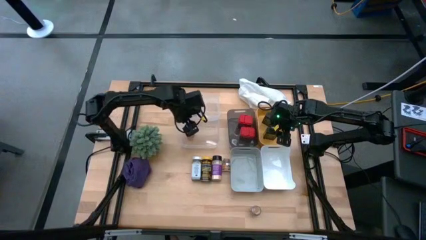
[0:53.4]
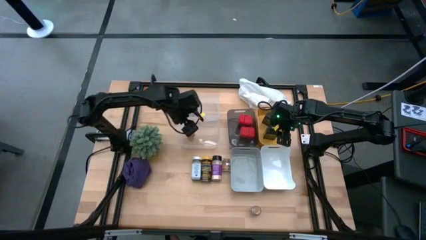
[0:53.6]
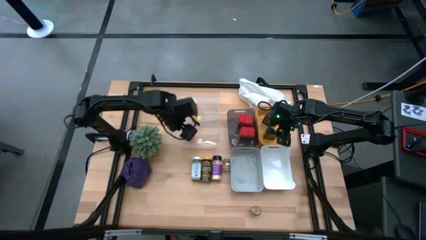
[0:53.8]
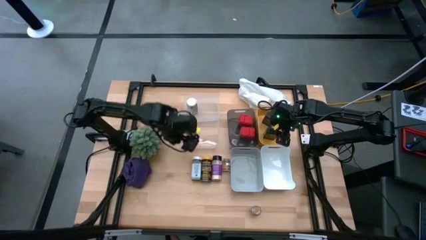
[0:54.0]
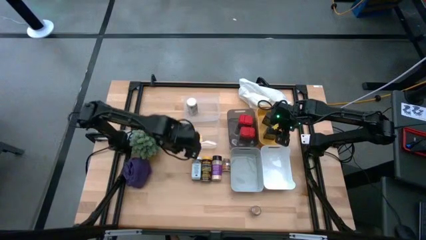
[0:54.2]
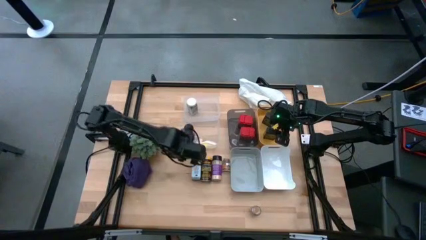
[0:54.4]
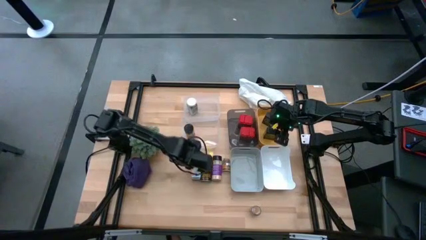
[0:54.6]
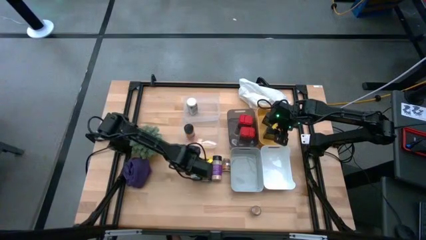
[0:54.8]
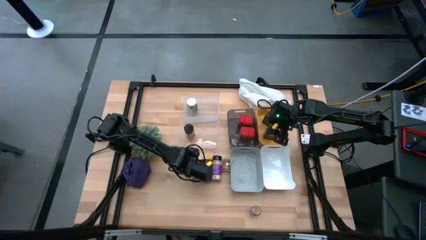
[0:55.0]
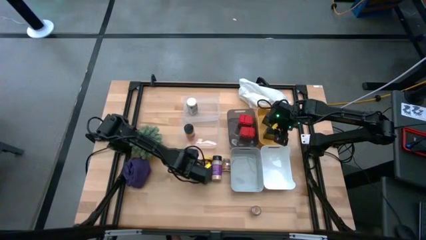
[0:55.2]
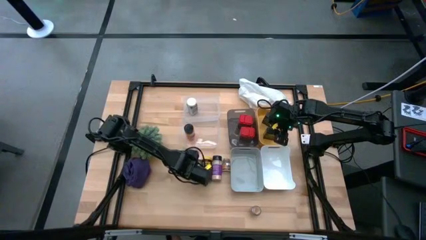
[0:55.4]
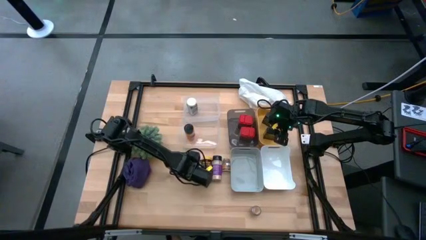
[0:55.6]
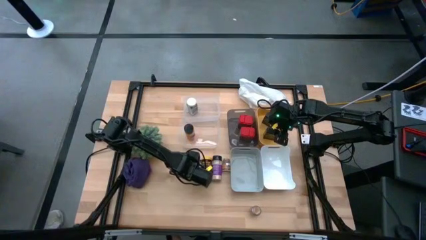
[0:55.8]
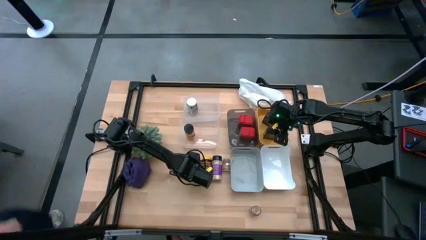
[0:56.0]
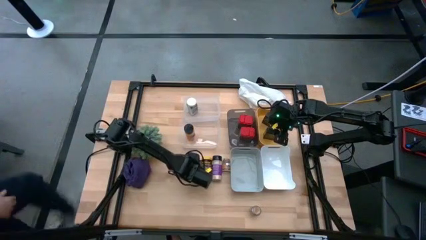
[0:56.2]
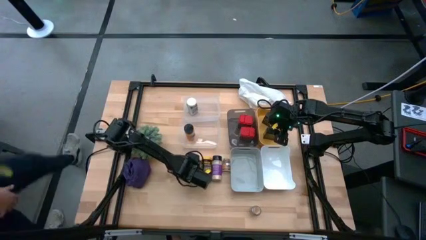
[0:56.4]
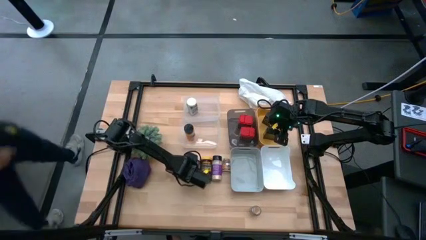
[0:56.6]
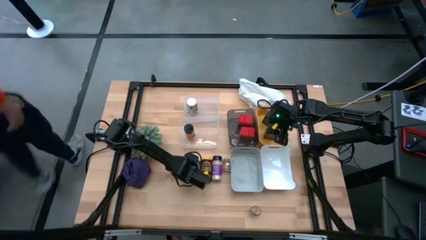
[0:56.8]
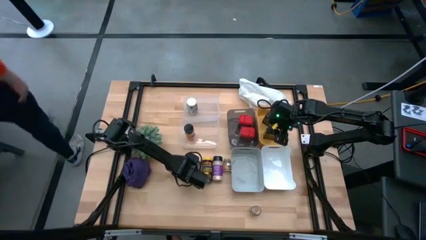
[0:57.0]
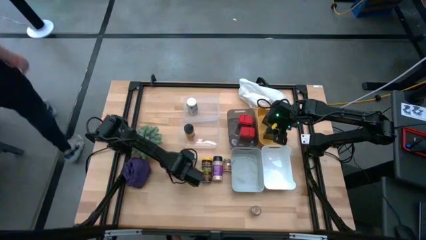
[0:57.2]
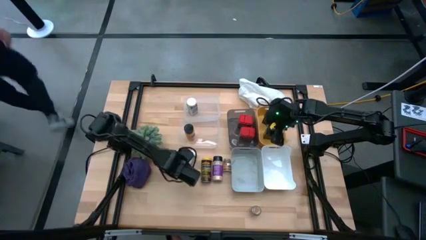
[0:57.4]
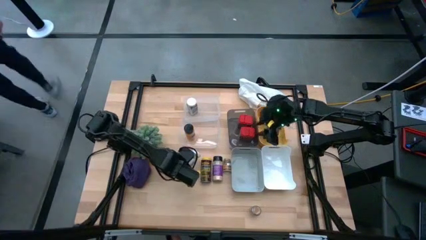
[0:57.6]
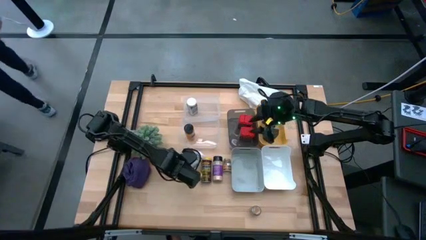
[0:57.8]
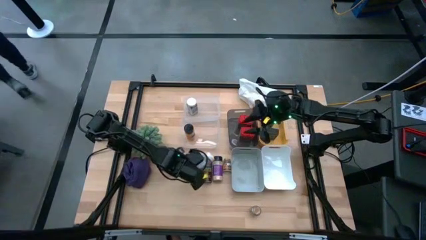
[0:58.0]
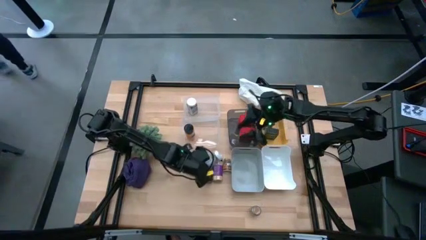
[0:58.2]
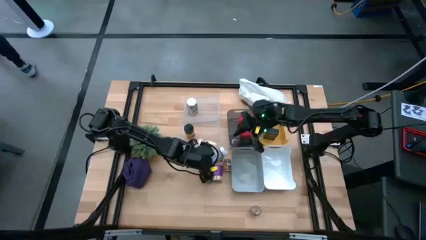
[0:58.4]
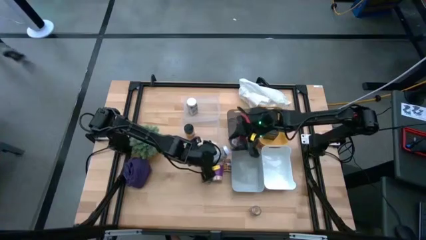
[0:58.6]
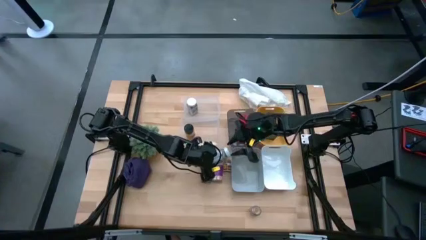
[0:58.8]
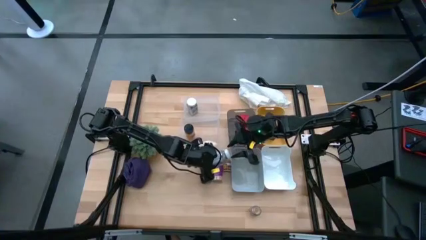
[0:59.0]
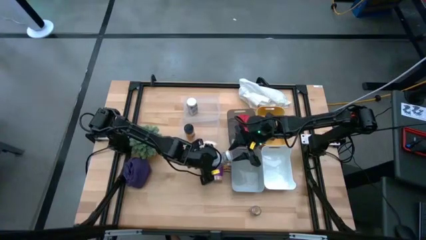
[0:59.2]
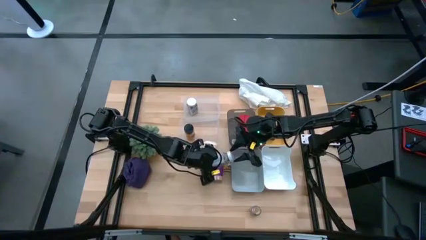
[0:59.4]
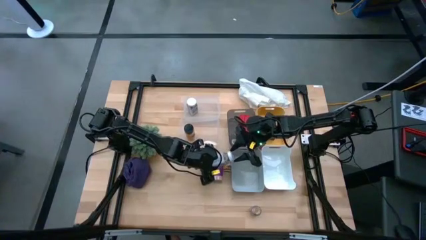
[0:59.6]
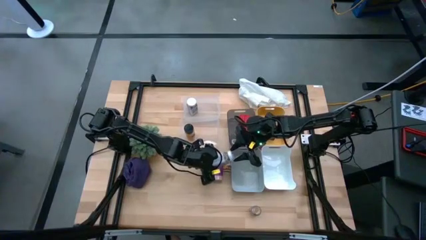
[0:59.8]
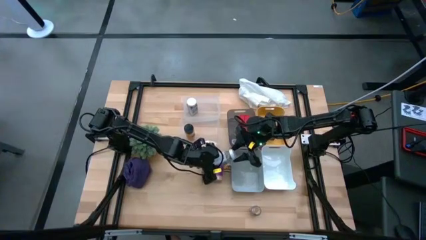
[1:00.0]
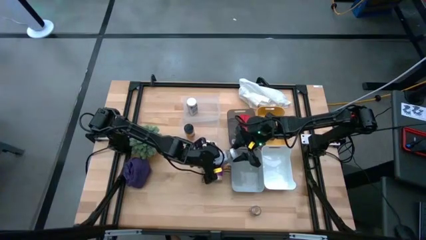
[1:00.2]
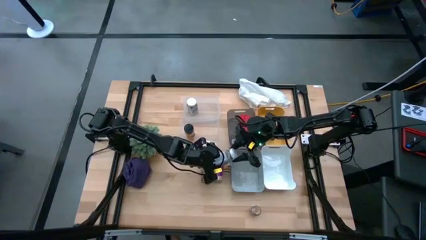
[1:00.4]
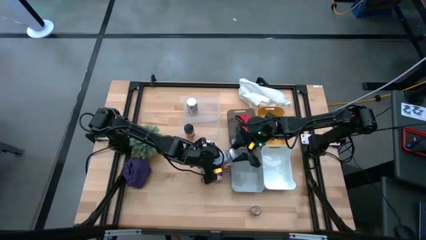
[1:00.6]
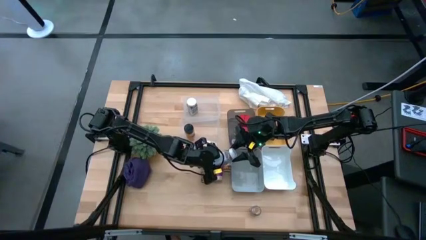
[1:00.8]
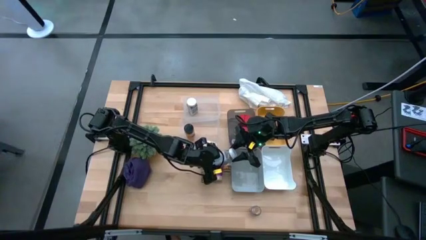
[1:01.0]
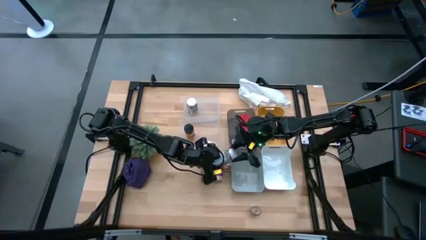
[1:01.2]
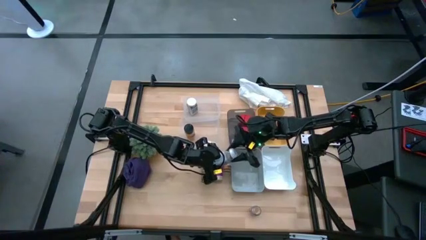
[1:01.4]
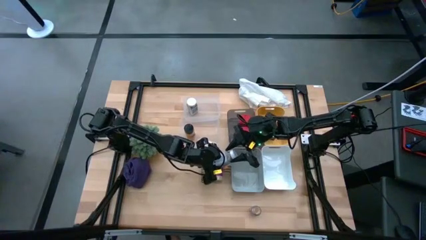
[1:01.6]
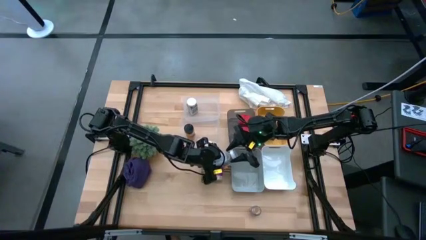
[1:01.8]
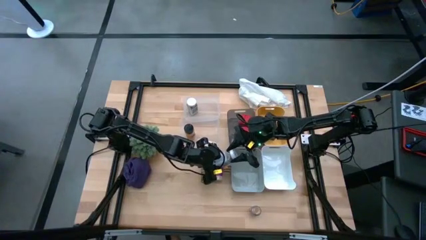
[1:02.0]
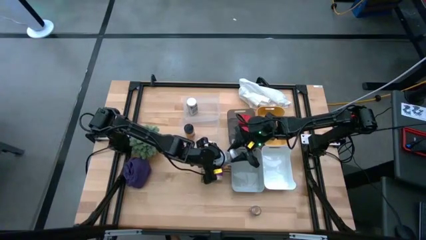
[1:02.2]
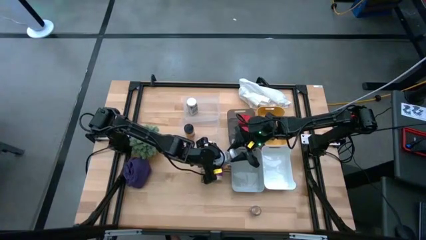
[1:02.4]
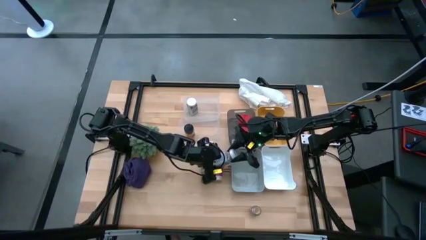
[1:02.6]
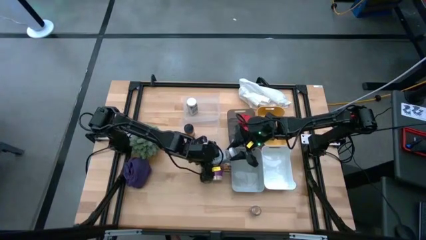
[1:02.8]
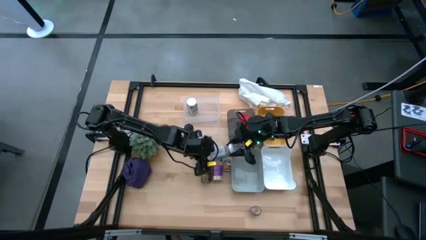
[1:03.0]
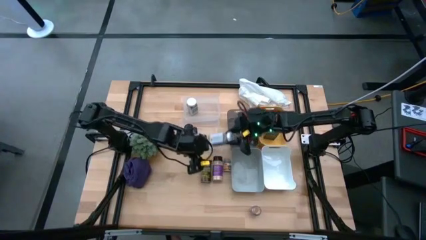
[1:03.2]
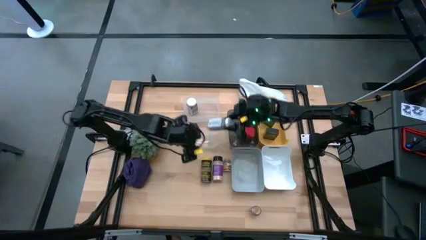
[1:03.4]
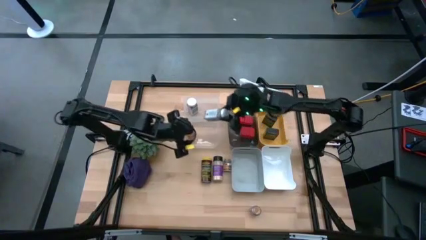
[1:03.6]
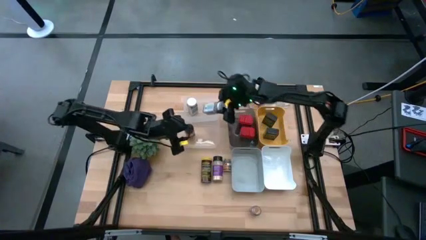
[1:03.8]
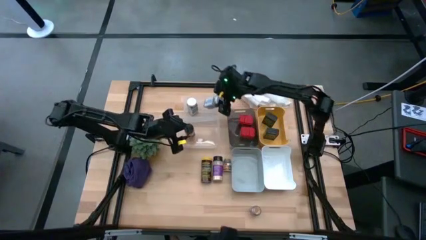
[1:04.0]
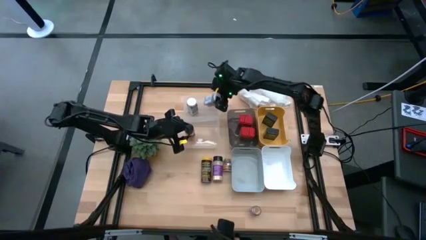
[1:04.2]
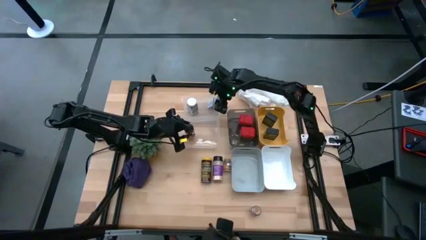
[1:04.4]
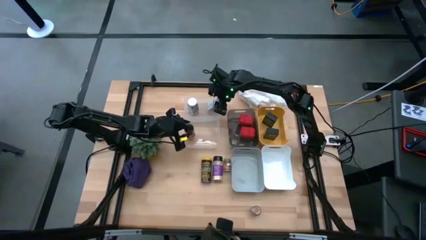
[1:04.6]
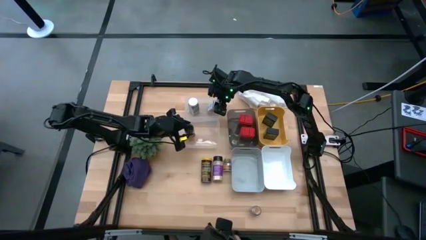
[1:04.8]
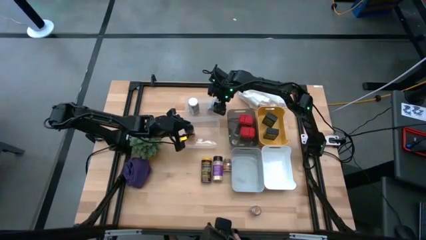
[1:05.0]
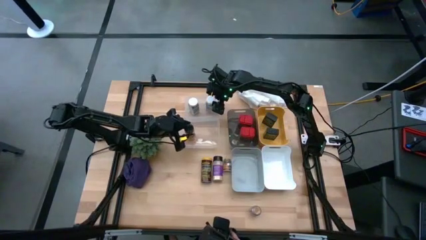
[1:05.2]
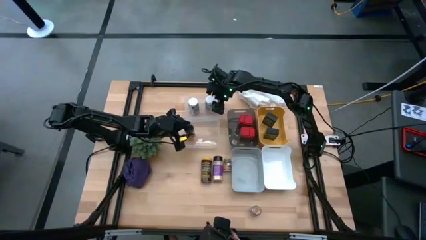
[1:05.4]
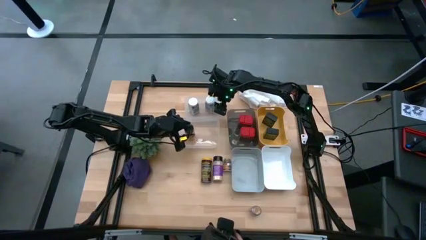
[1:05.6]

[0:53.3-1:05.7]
Task: Sort spices by type
Put the white seasoning bottle into the top transparent bin

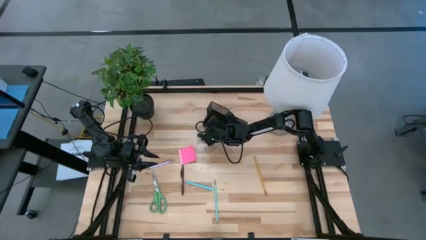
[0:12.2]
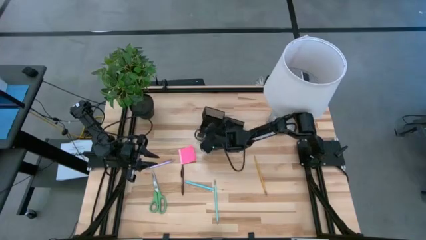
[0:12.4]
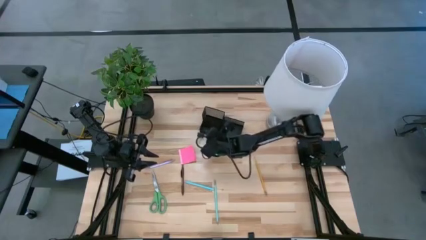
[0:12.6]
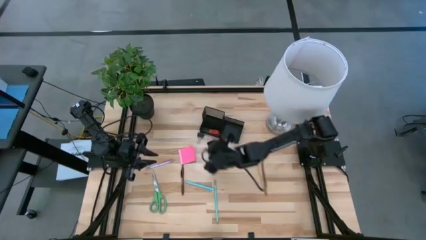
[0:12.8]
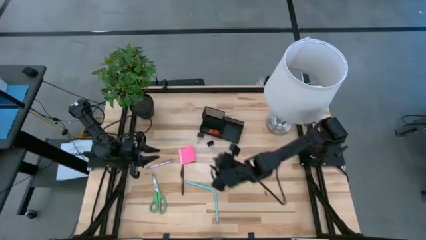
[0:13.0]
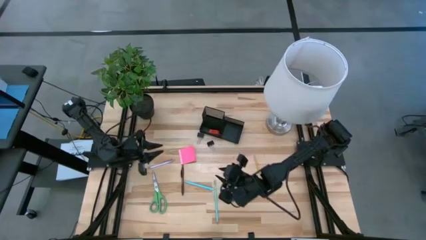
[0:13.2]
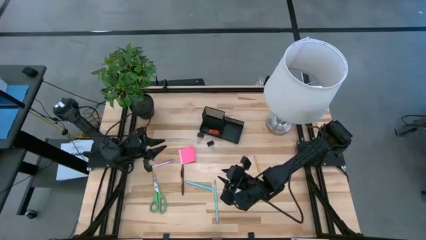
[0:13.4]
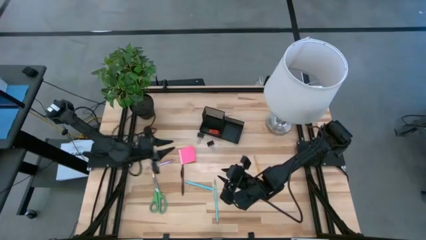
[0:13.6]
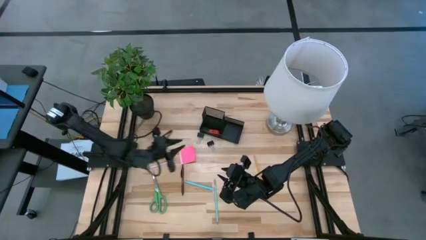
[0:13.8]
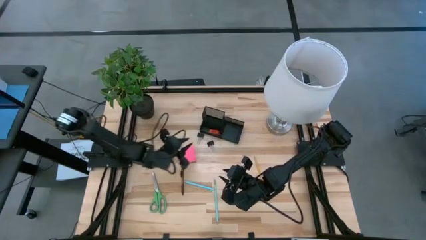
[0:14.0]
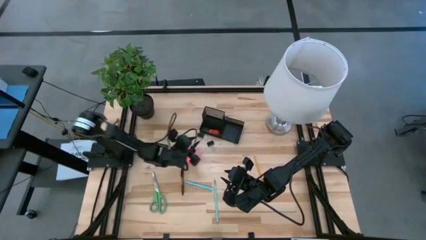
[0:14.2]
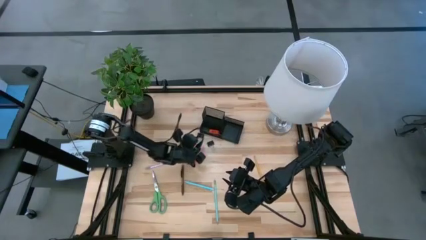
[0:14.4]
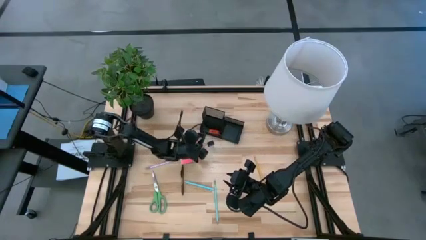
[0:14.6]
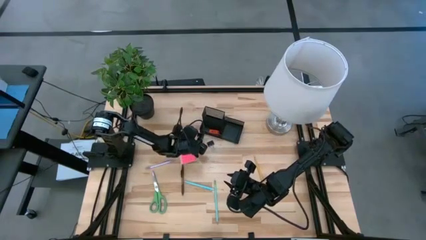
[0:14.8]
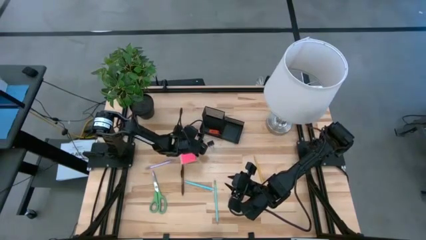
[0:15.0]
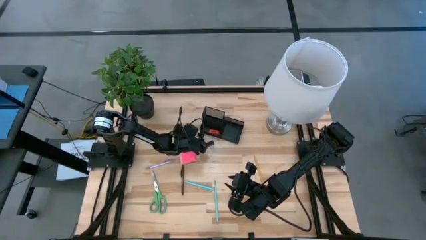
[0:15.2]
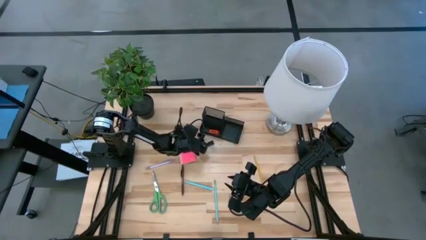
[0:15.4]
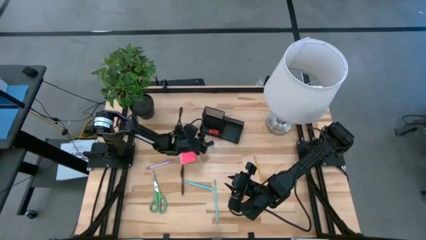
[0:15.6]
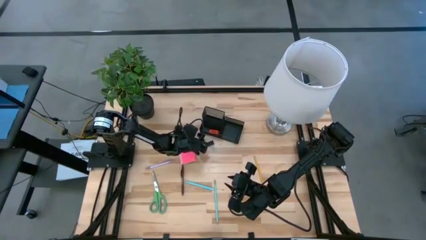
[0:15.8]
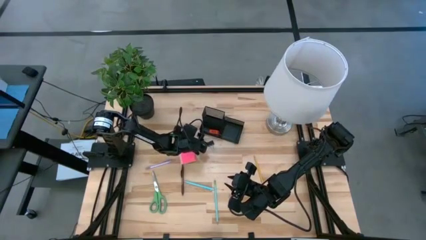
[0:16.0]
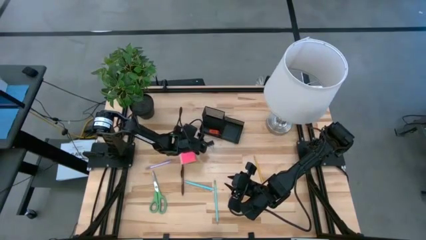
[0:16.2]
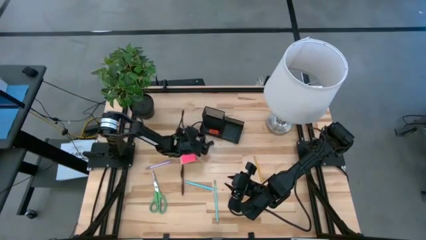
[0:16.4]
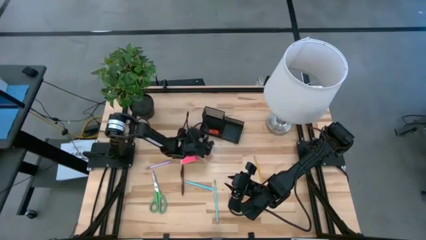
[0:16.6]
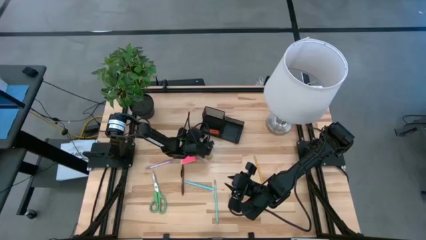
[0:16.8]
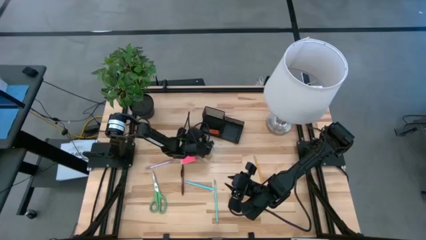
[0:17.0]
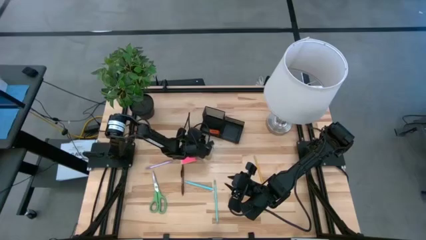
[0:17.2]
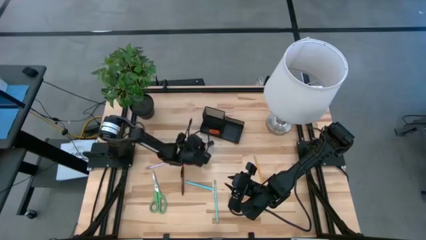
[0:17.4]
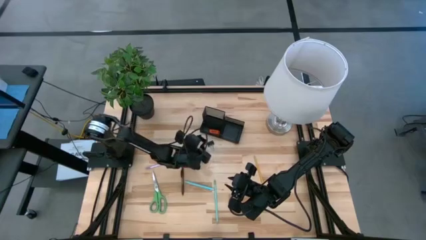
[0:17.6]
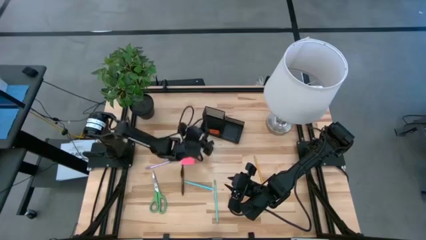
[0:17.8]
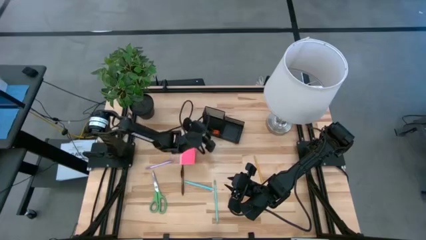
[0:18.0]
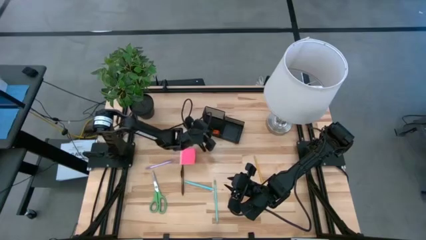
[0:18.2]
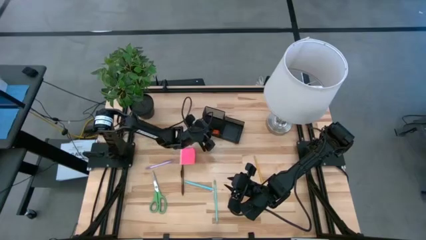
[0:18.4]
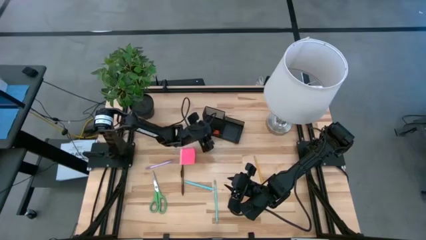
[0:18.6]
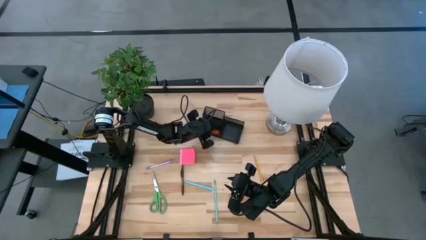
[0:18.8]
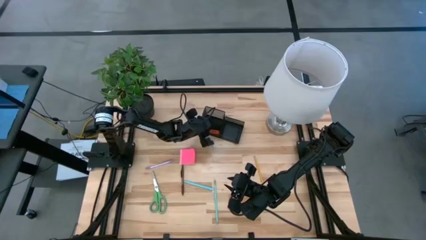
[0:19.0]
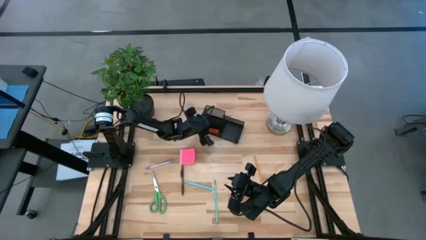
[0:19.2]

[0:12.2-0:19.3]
Task: Pick and place office supplies into organizer
Put the left black binder clip into the desk organizer
